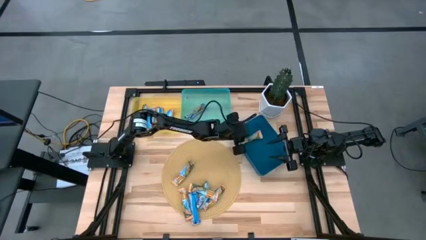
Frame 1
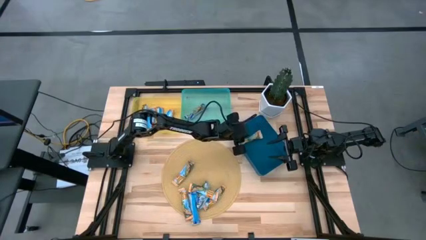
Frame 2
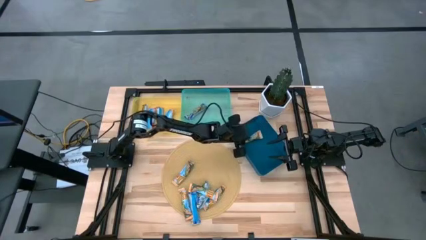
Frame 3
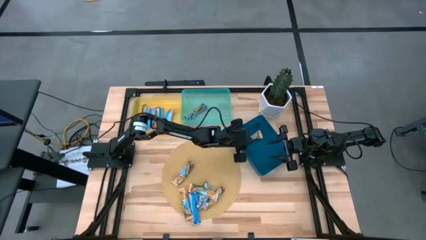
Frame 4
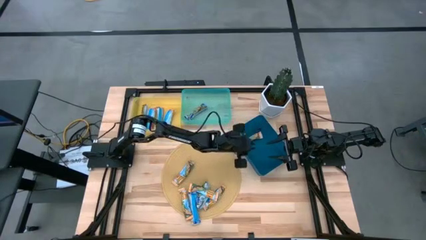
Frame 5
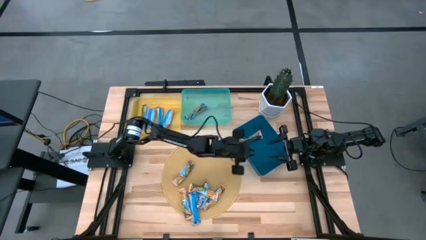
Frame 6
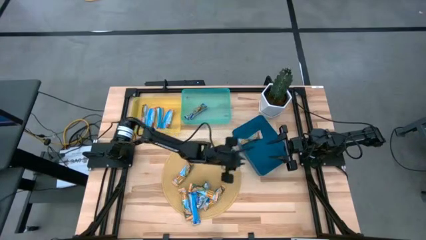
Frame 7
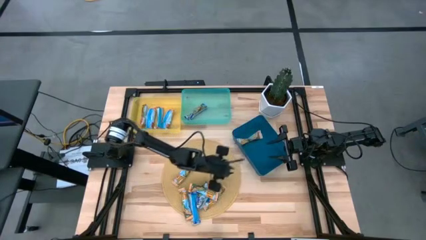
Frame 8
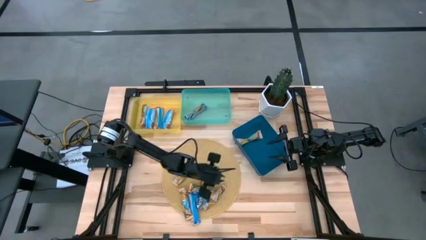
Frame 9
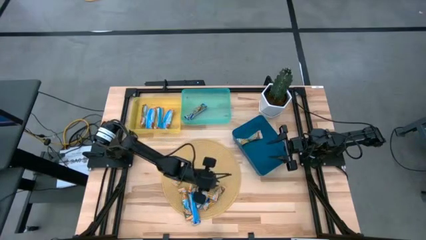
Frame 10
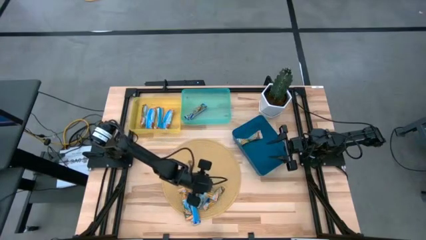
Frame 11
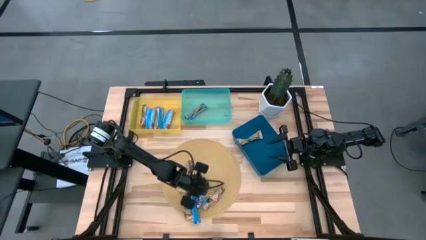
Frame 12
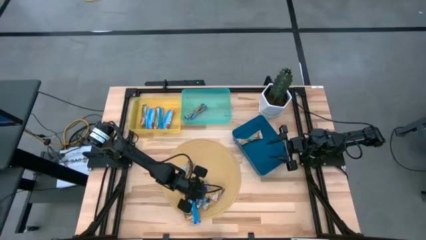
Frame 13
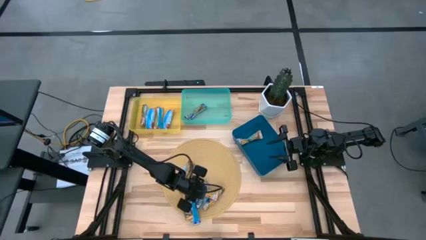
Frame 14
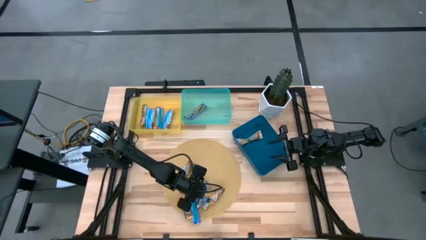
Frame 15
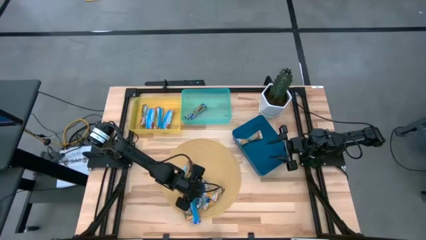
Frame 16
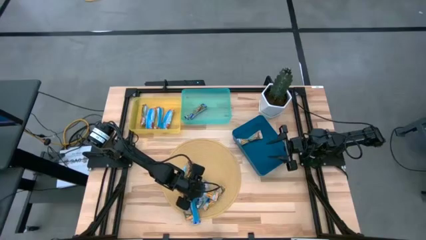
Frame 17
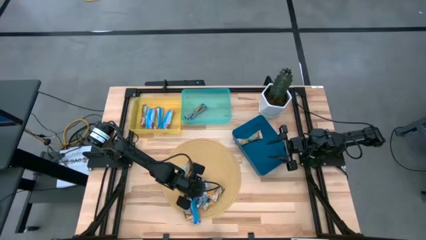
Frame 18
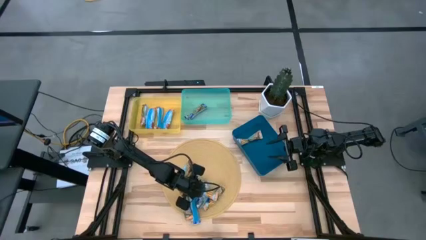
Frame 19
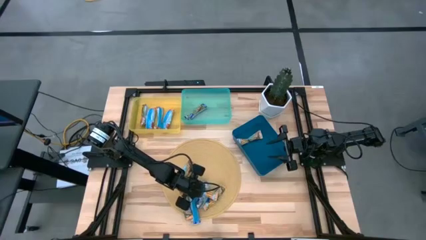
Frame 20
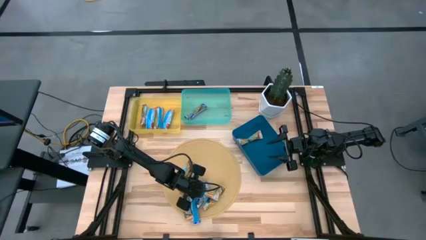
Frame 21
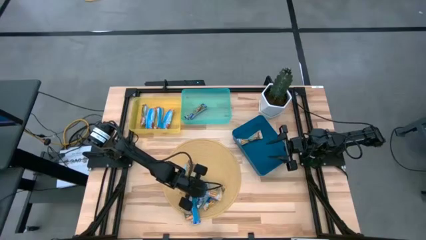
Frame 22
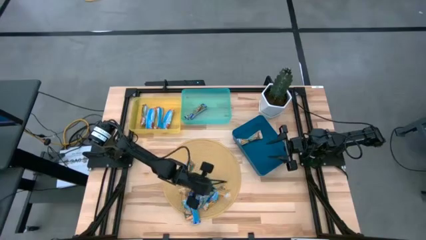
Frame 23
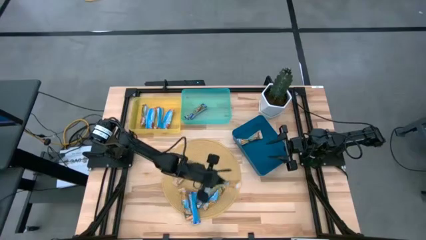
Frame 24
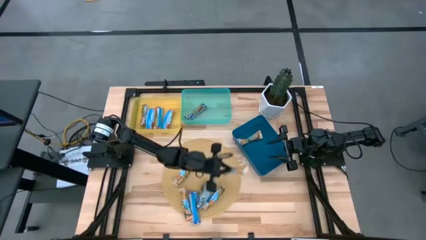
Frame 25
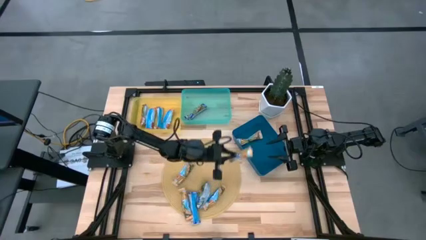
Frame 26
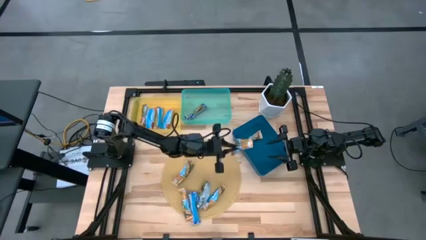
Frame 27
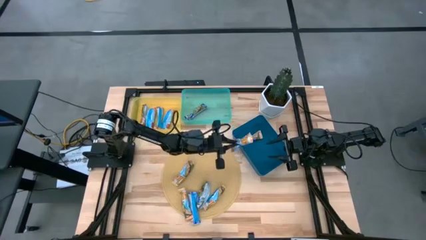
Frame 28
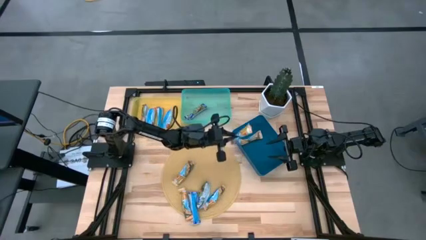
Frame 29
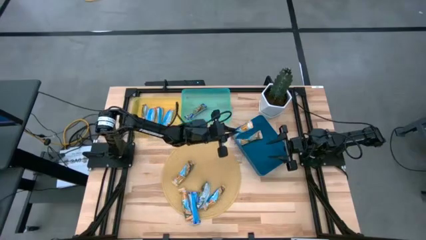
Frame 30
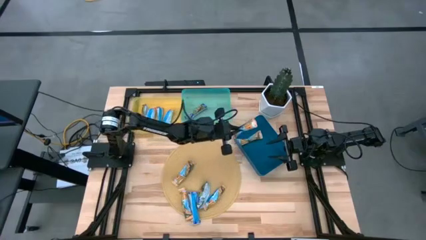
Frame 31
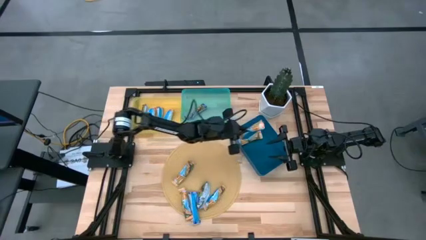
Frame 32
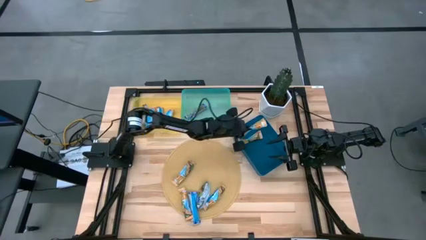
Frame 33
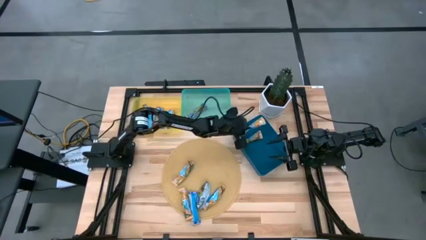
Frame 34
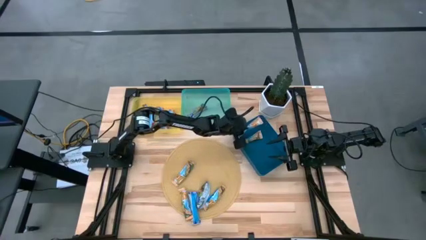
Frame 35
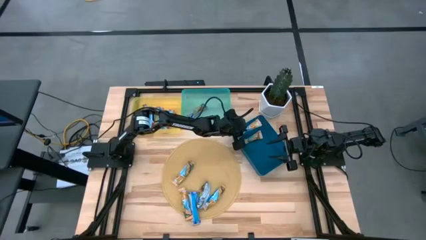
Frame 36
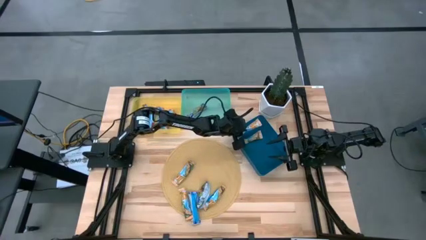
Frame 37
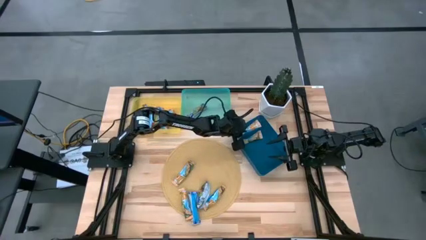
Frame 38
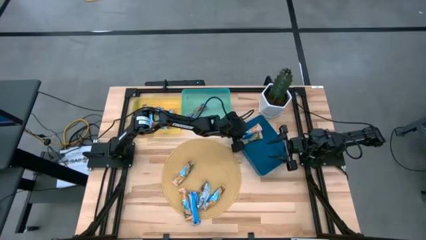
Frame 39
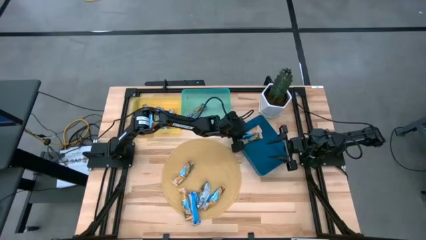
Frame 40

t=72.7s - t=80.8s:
Task: Pick and place Granola Bars by type
Put the yellow granola bar into the blue bin

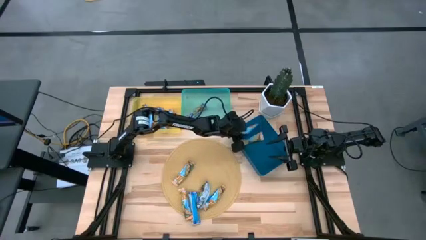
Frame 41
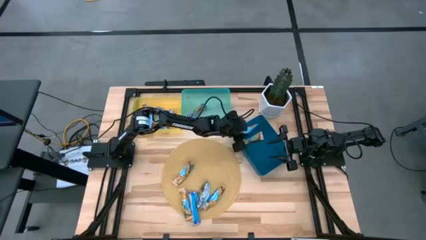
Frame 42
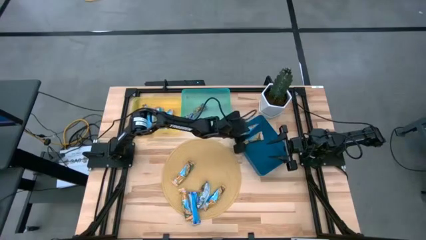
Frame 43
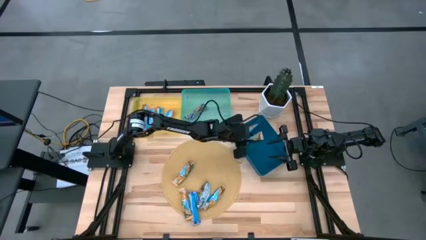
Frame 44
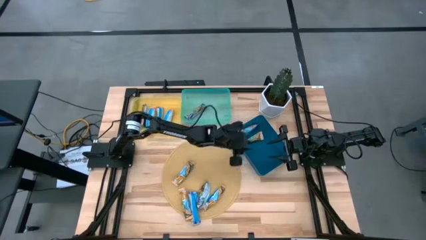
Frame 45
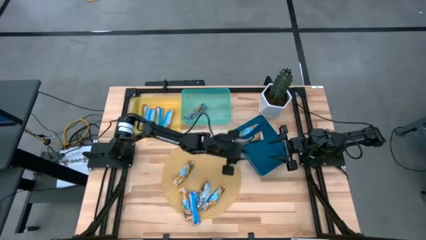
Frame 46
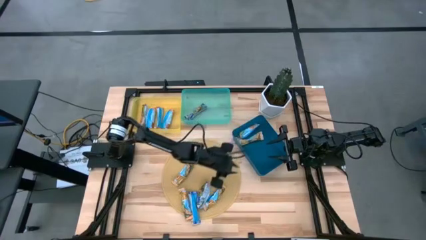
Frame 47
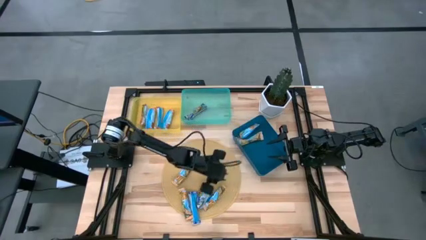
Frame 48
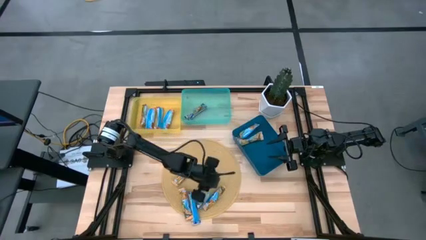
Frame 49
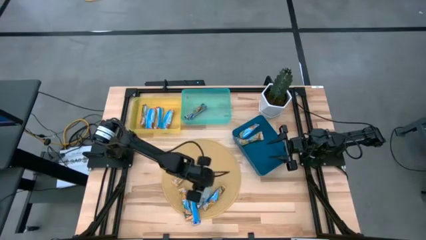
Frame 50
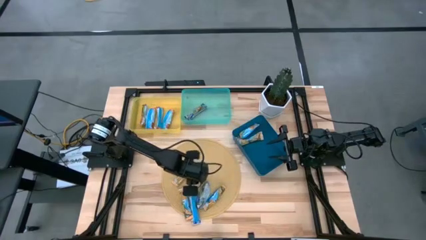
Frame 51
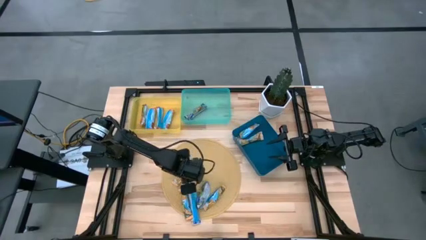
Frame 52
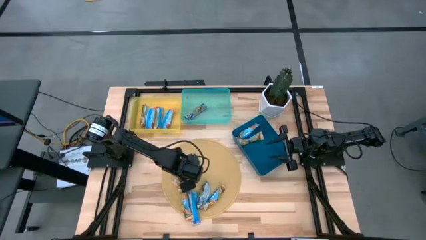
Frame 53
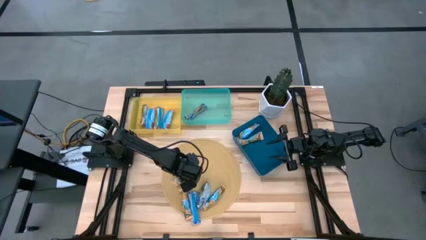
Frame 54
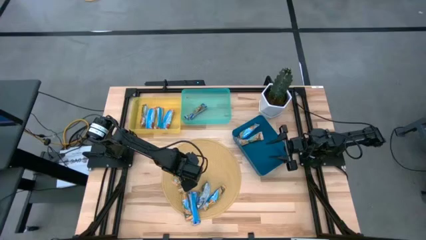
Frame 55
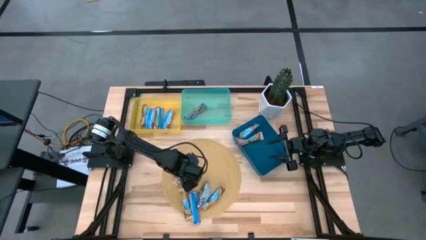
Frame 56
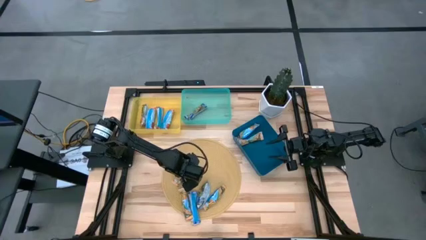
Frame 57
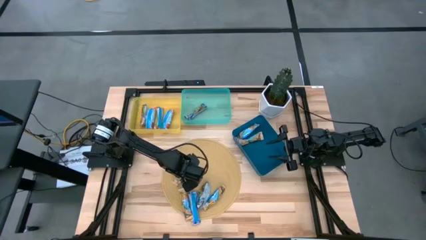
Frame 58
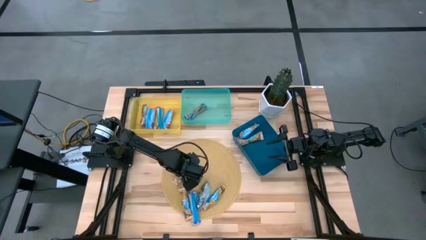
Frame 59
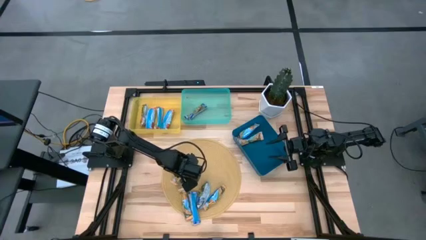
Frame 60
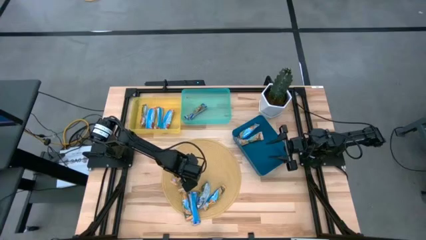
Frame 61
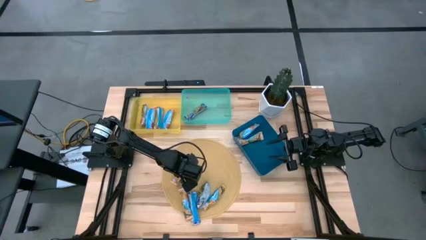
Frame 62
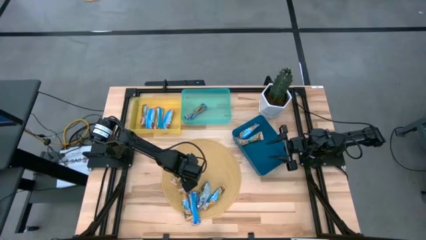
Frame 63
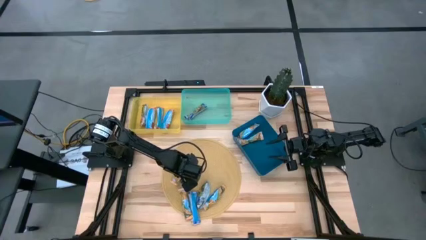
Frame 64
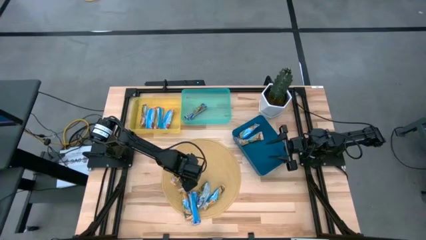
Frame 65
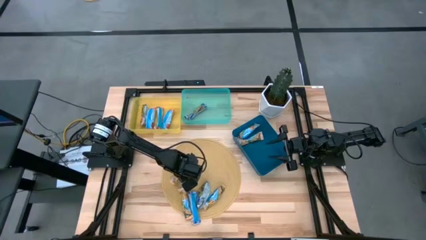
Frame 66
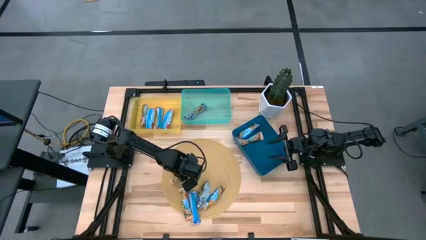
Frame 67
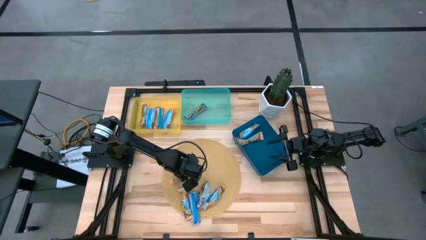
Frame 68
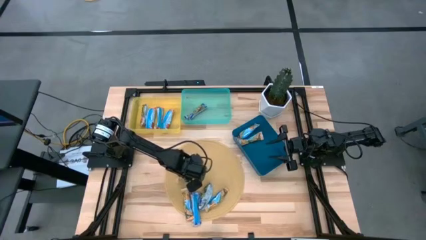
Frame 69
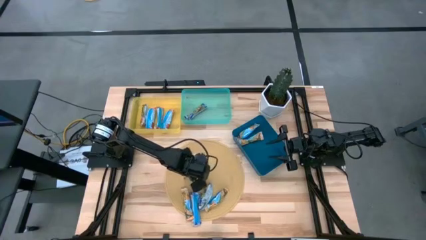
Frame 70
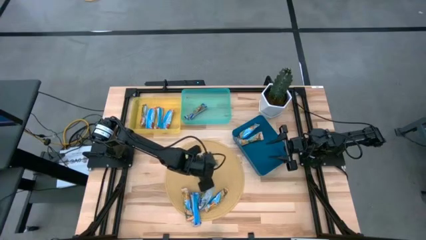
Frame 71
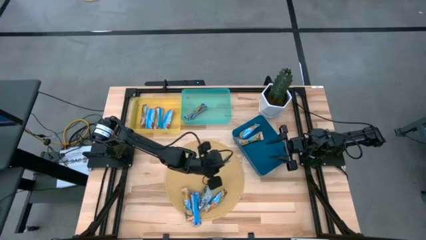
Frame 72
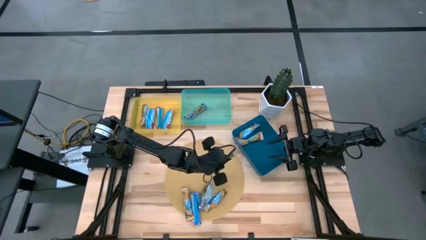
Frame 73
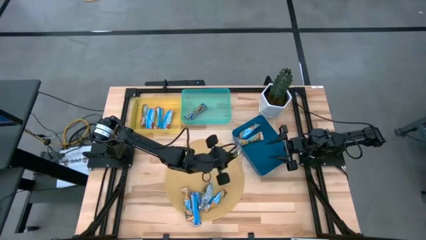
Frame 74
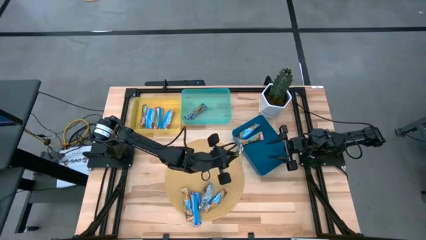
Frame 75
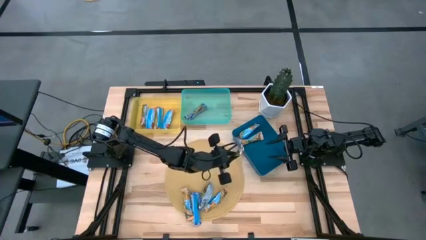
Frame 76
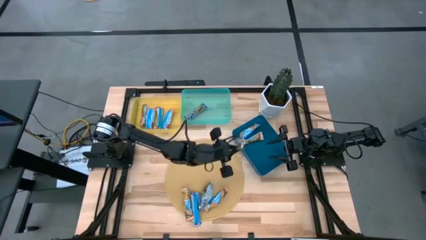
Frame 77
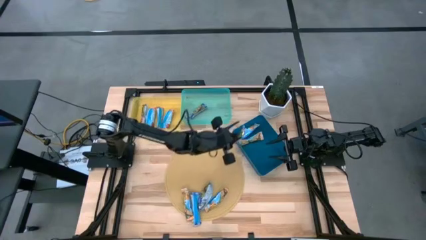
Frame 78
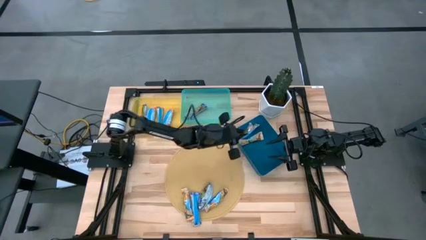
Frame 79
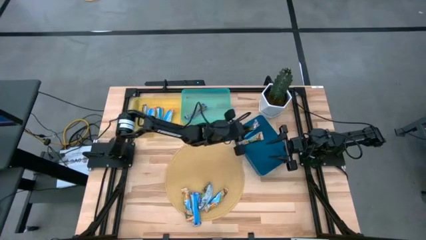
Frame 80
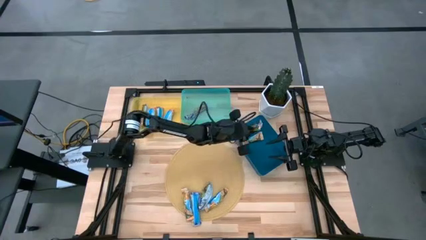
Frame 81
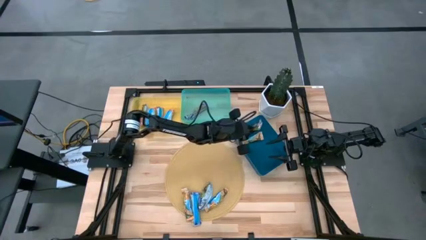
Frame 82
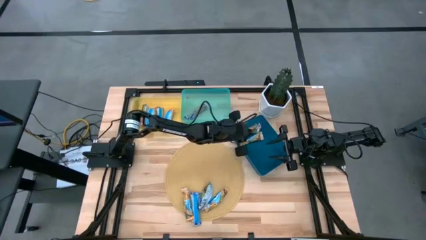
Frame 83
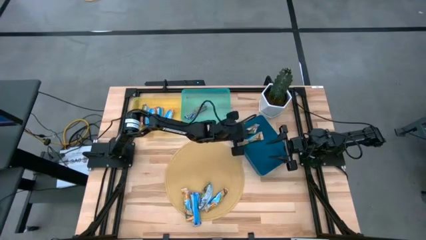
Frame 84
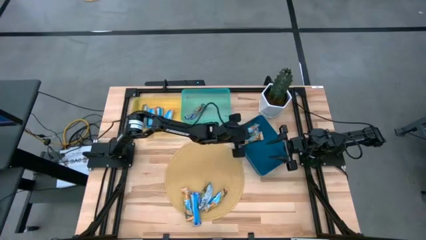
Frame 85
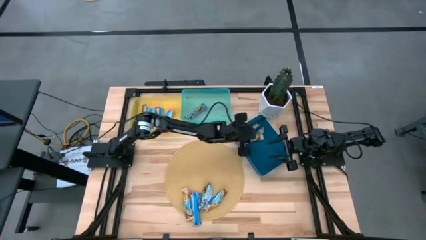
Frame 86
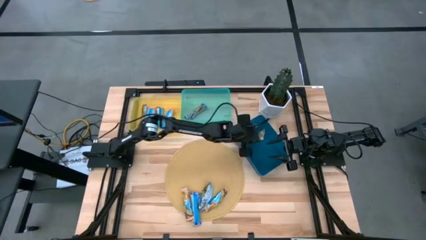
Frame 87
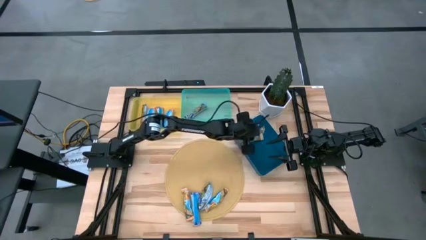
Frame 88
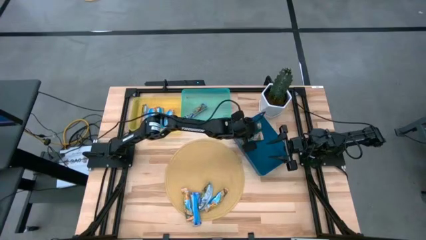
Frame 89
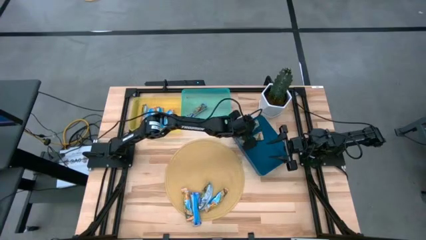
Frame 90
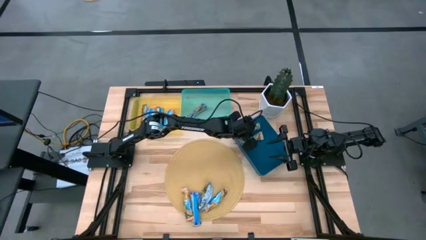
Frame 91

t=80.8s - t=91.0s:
Put the top yellow granola bar into the blue bin
